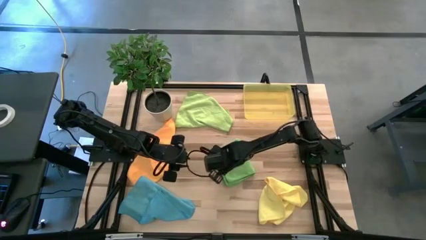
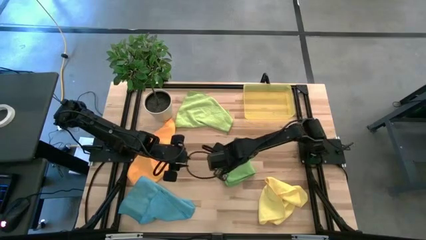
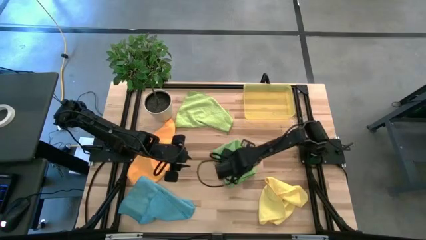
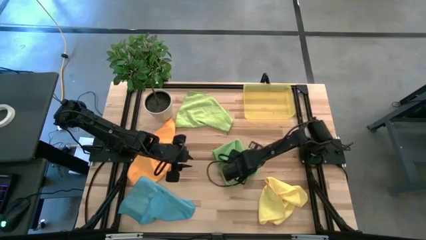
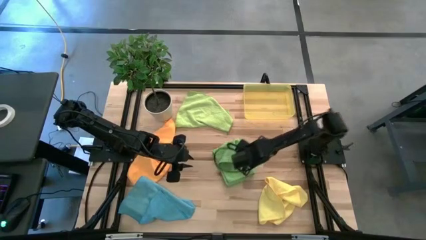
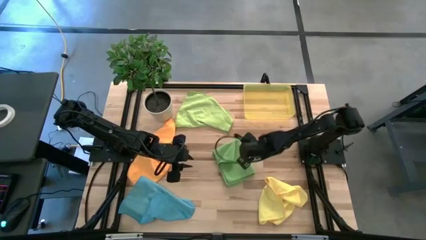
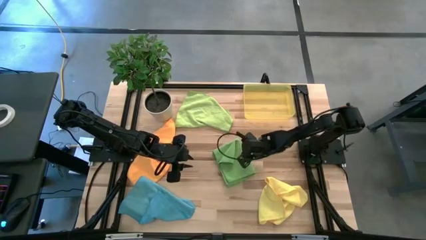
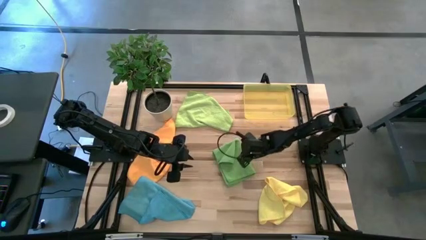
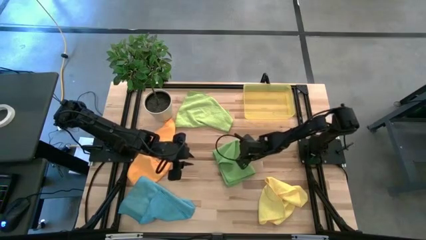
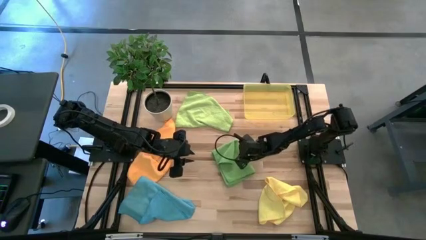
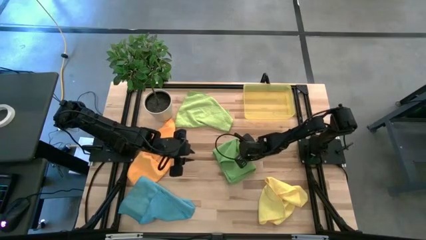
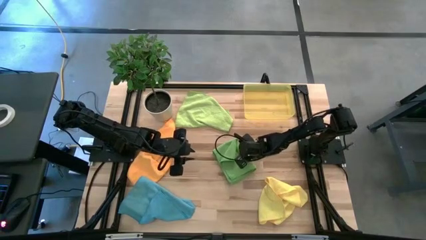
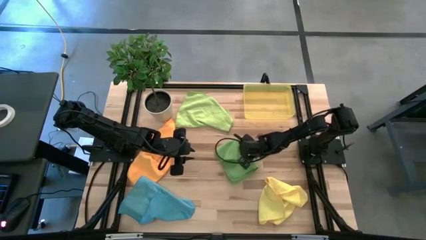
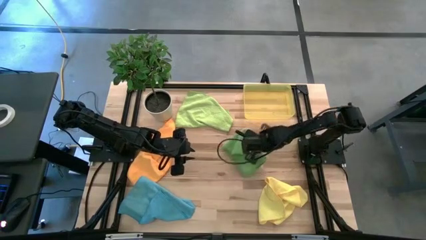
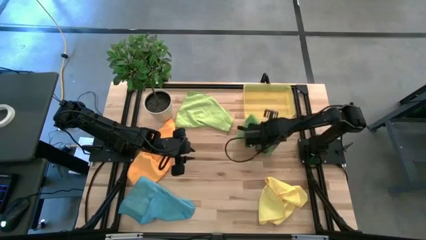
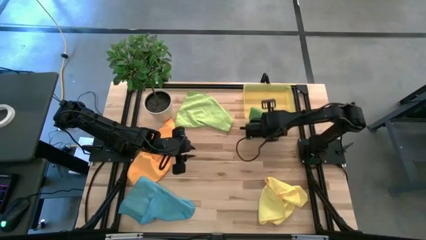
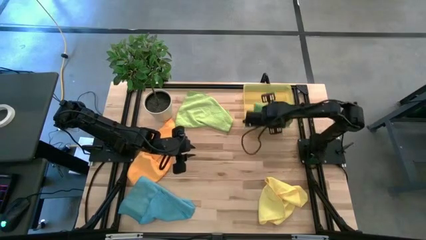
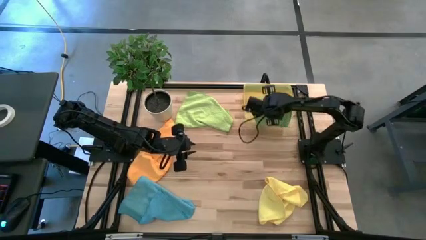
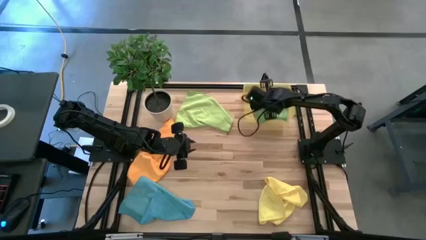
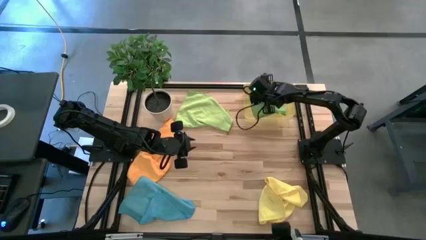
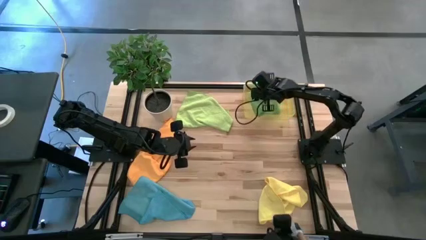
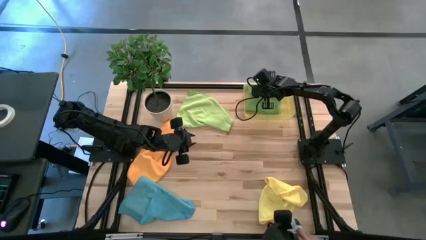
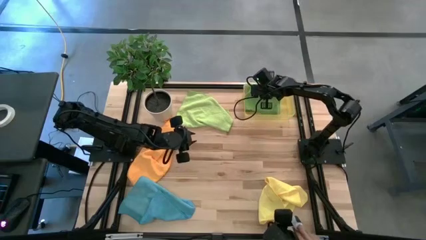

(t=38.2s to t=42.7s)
Task: Fold microfiber towels
Put the green microfiber towel into the yellow bin

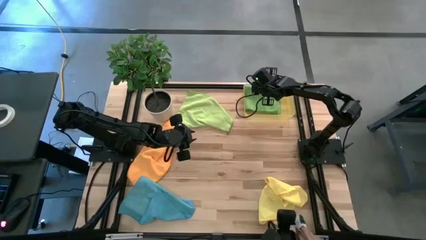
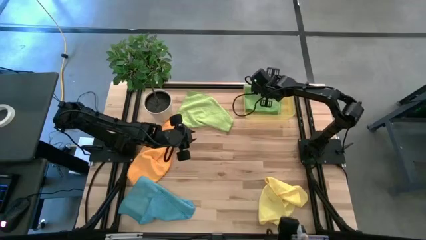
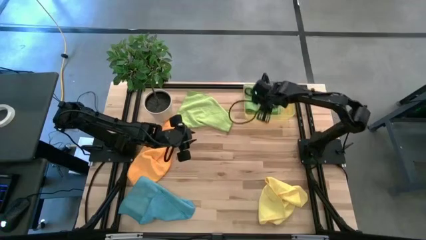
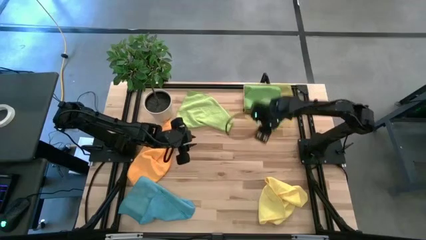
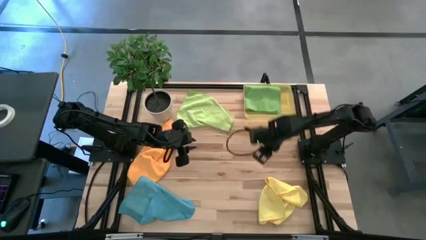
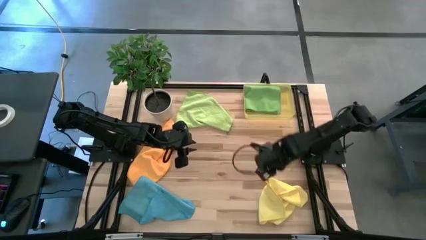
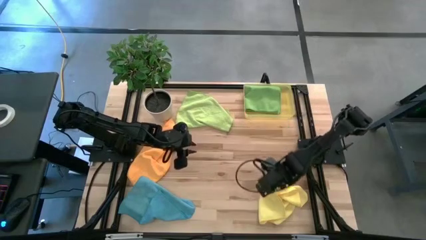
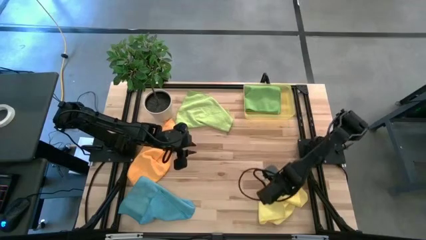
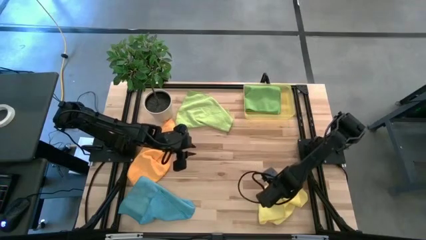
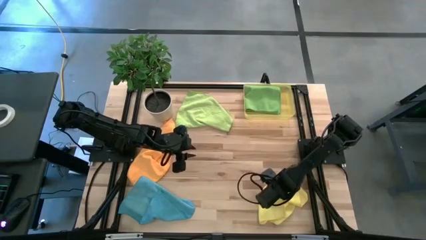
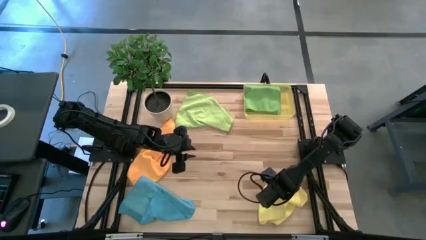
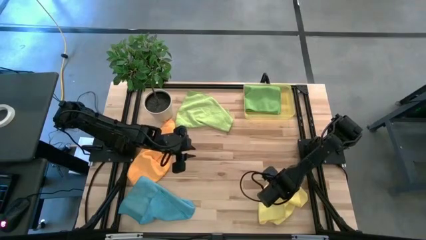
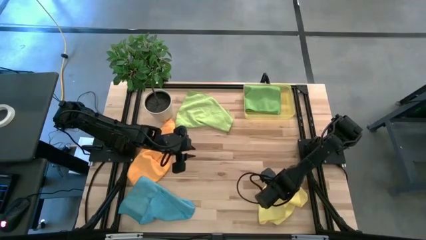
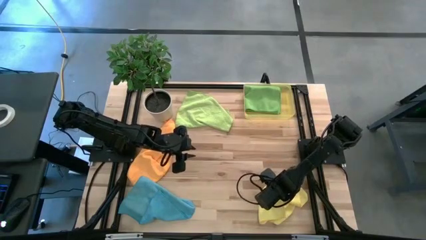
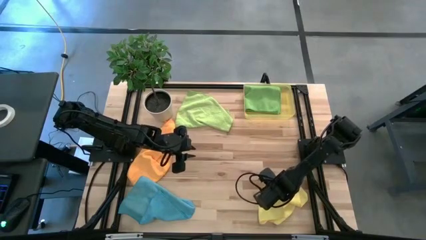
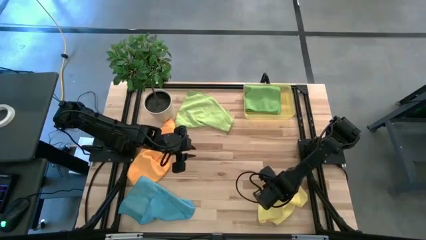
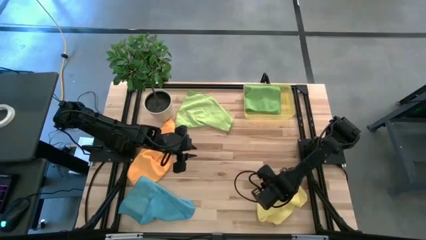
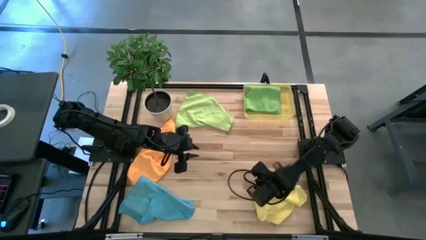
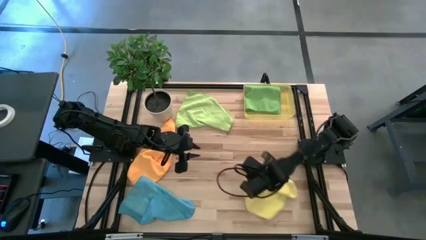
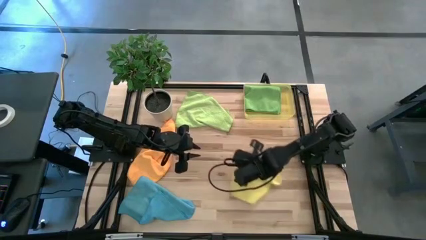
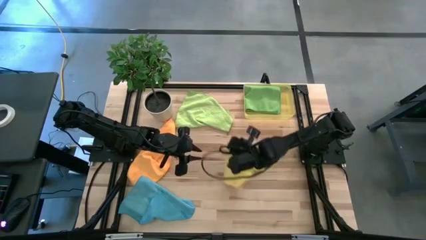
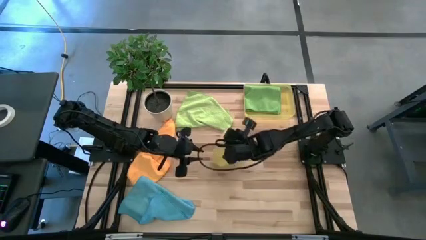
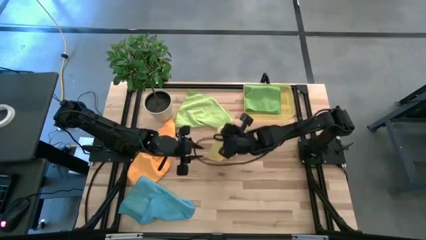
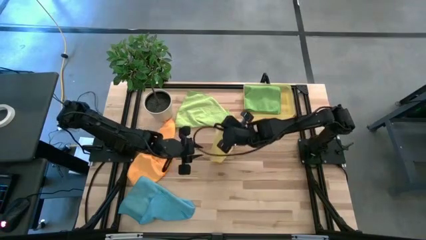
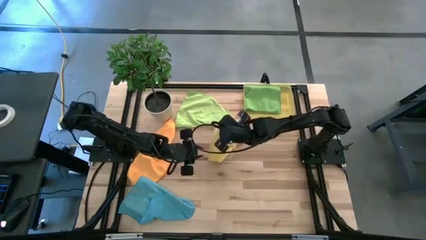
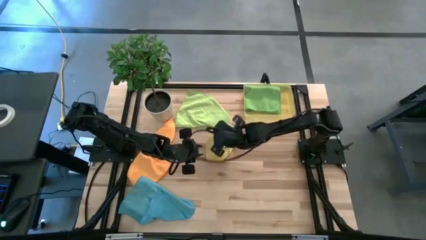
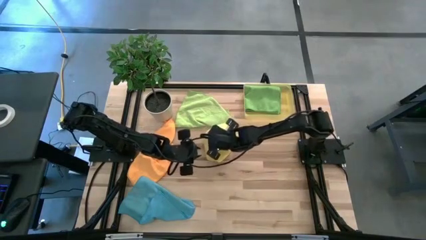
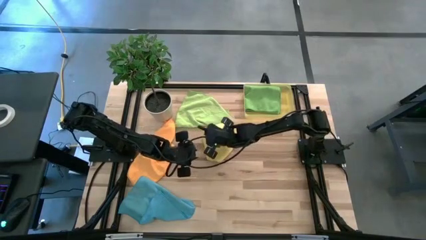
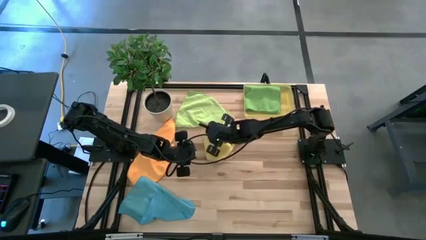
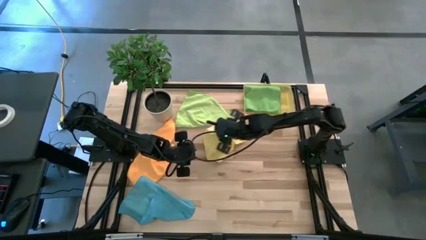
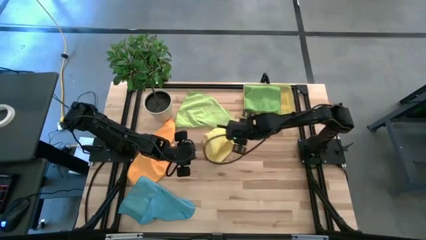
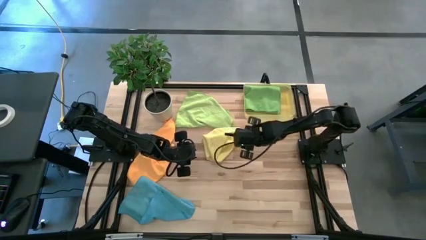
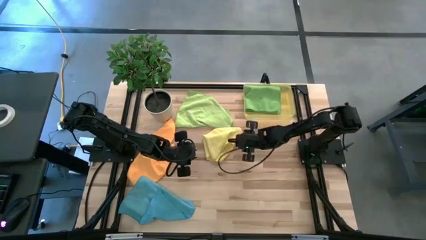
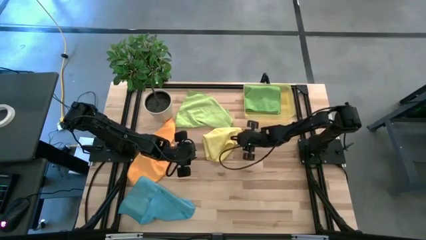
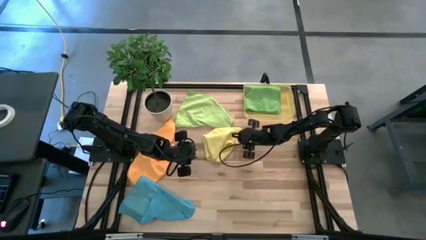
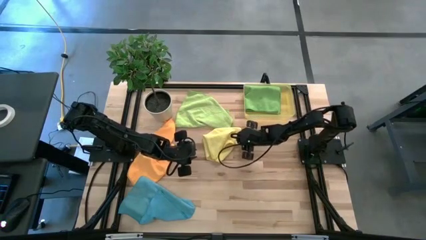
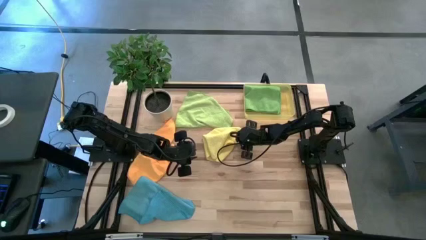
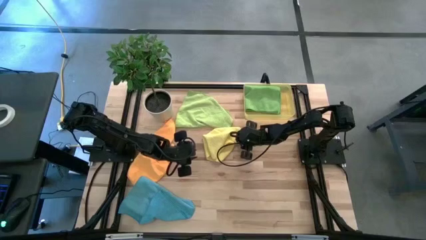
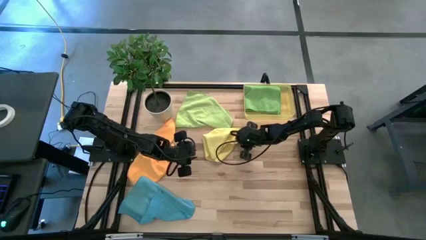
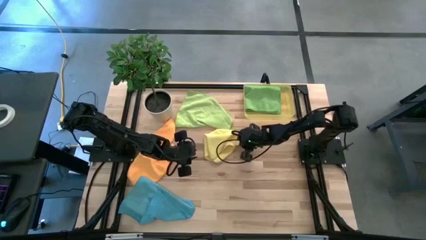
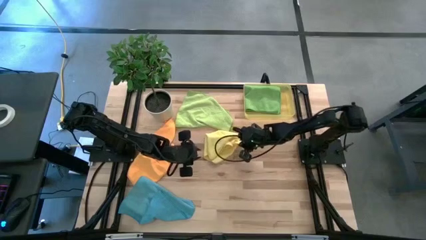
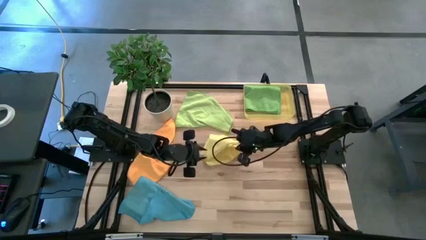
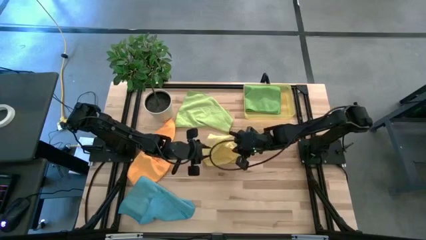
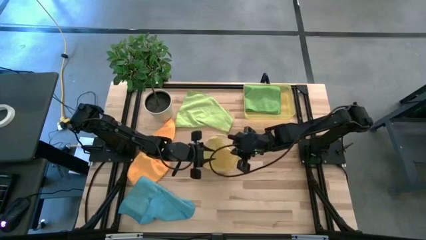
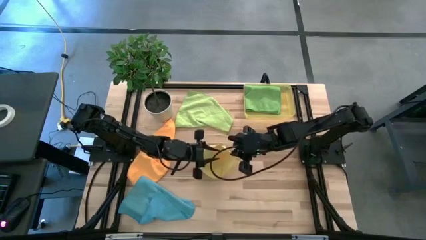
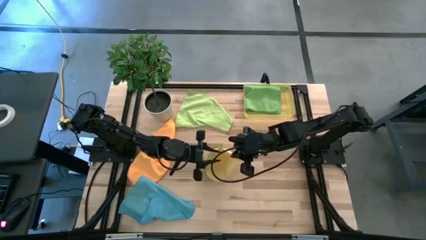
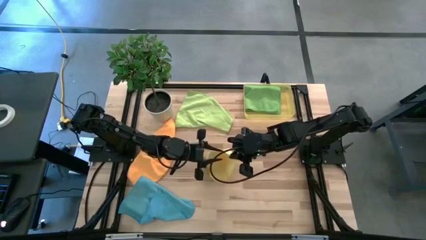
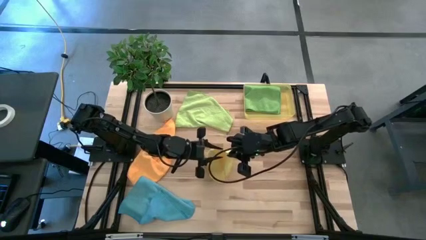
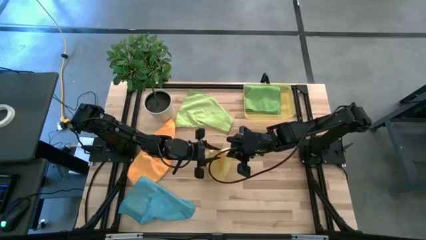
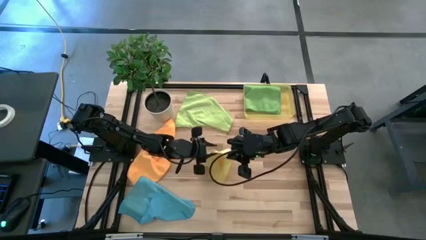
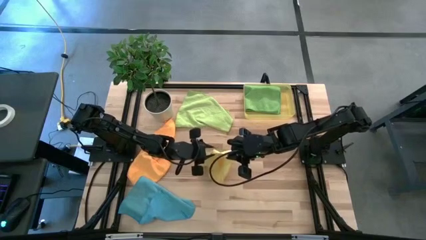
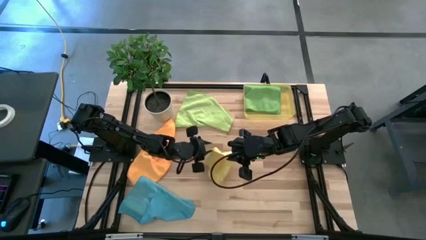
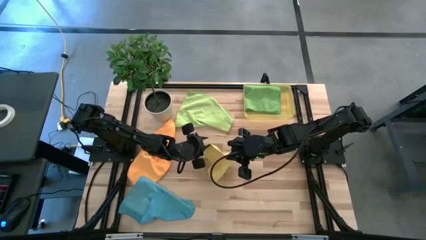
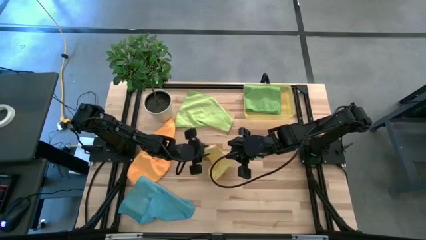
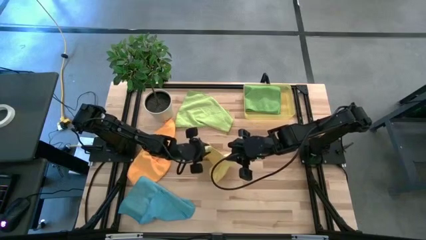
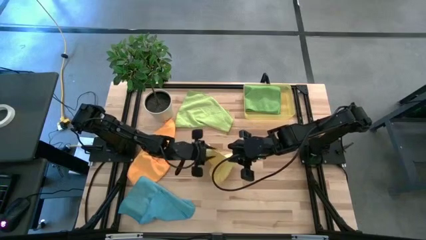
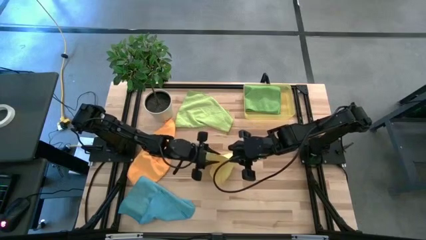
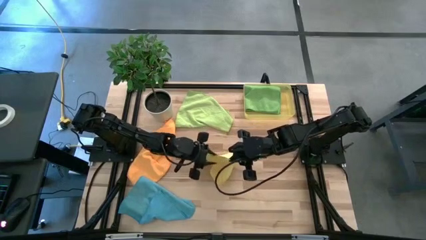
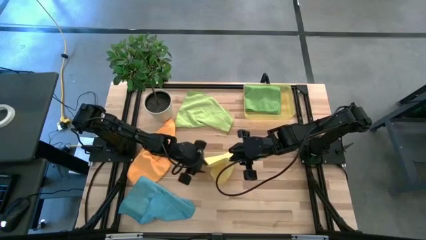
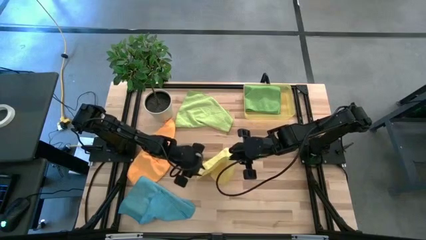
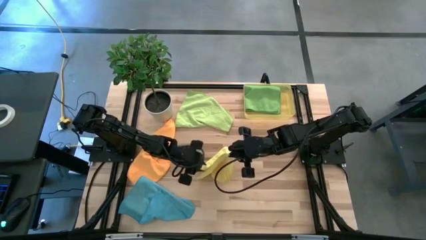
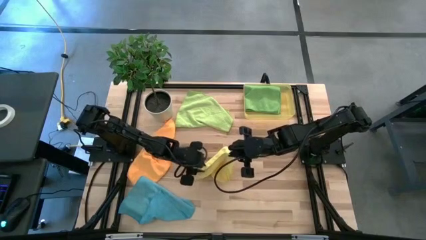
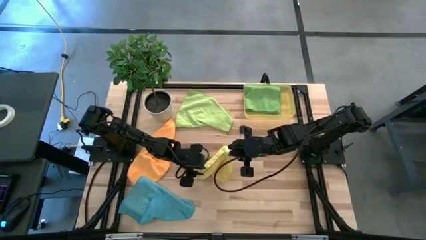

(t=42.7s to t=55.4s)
Fold the yellow microfiber towel
